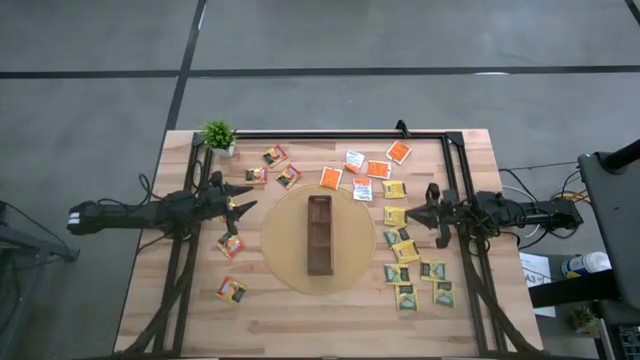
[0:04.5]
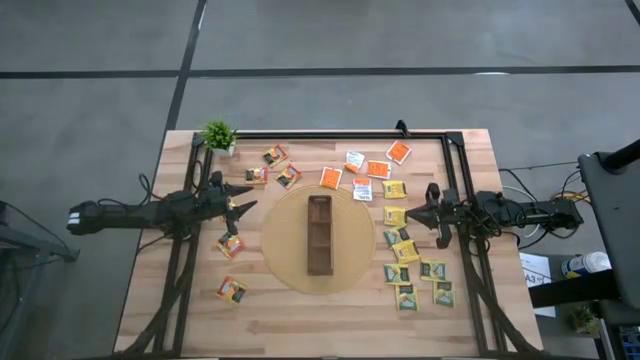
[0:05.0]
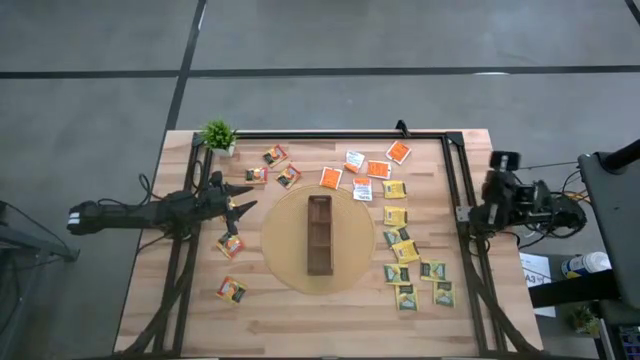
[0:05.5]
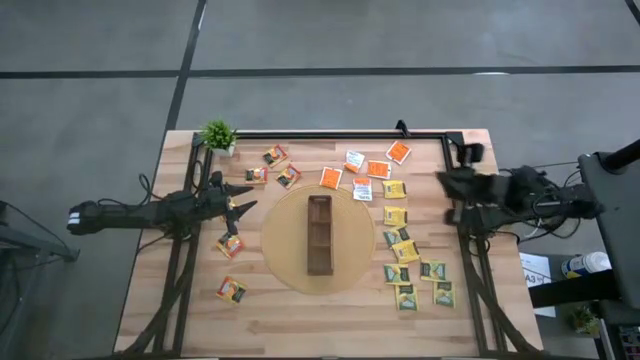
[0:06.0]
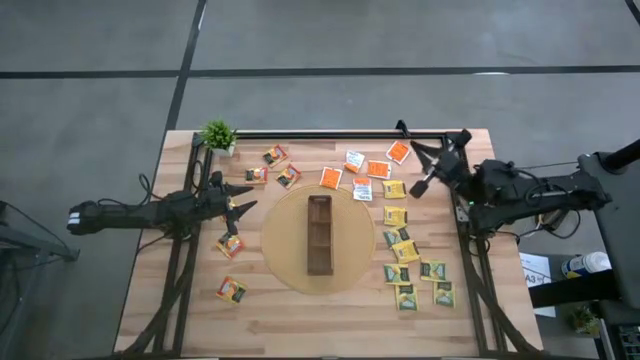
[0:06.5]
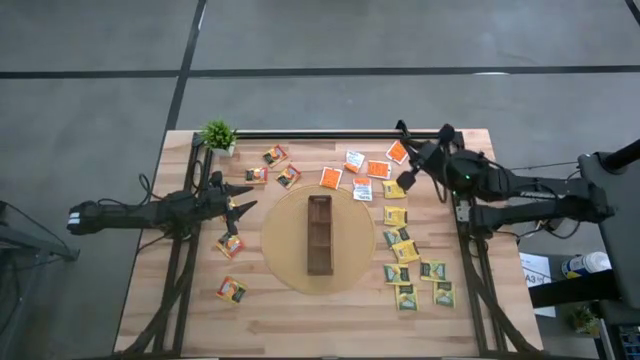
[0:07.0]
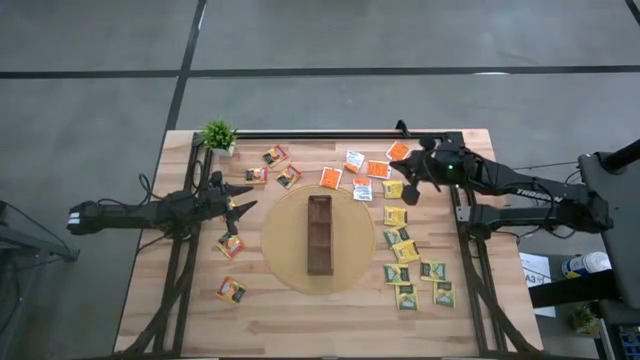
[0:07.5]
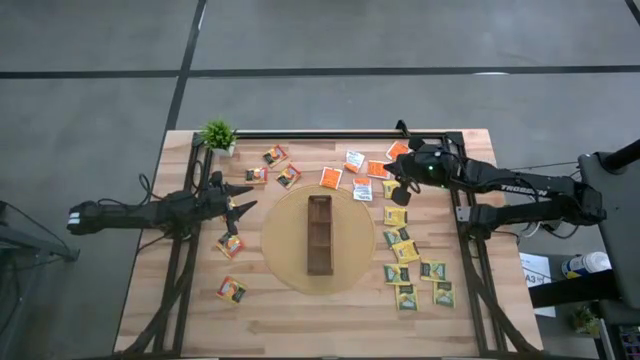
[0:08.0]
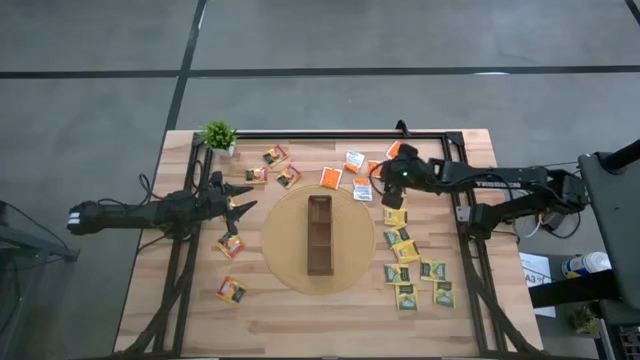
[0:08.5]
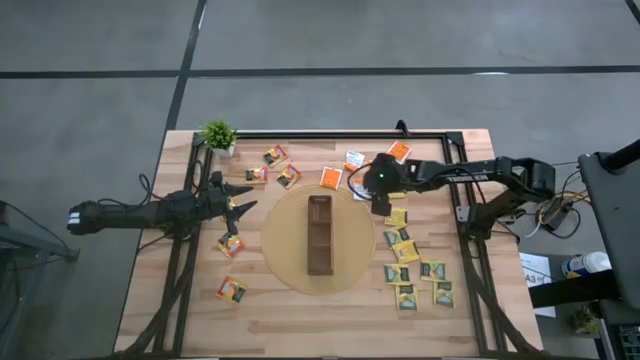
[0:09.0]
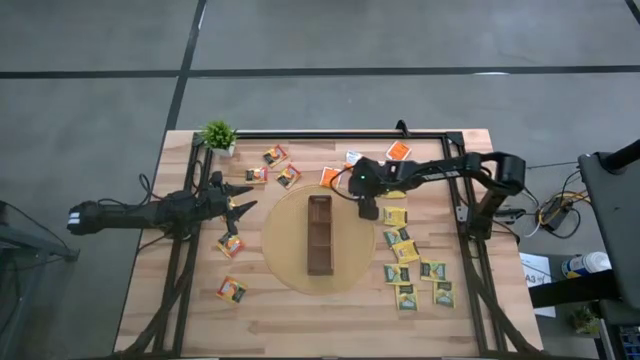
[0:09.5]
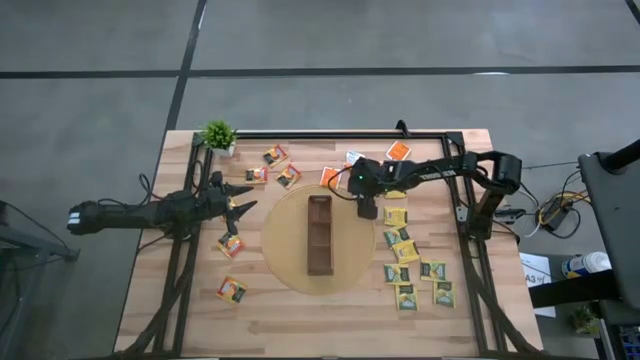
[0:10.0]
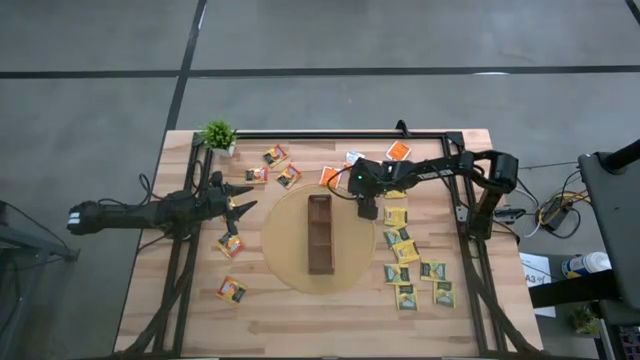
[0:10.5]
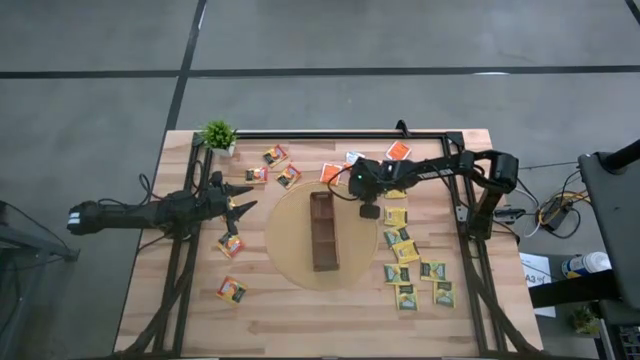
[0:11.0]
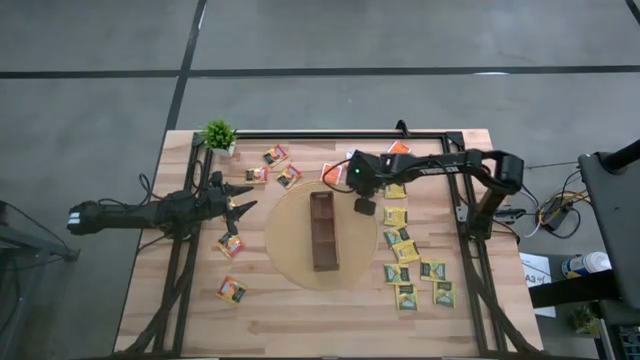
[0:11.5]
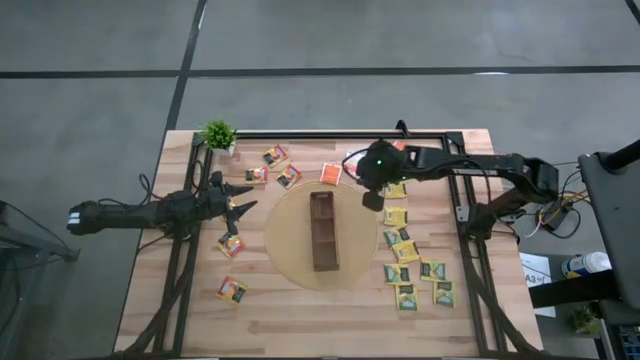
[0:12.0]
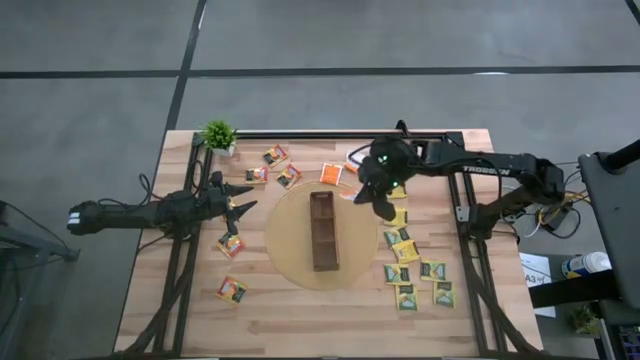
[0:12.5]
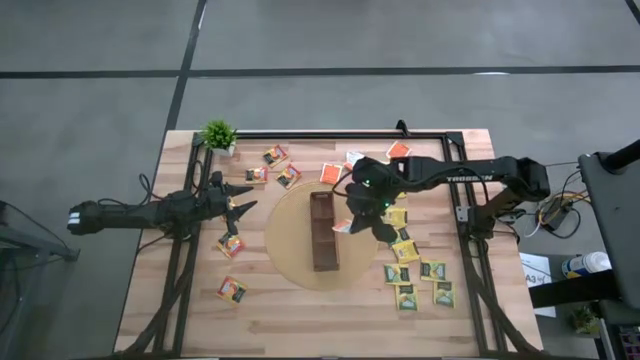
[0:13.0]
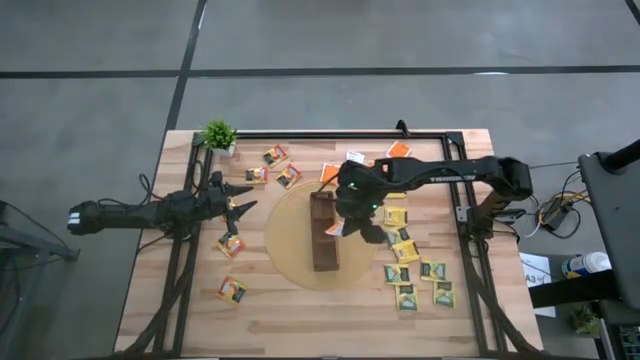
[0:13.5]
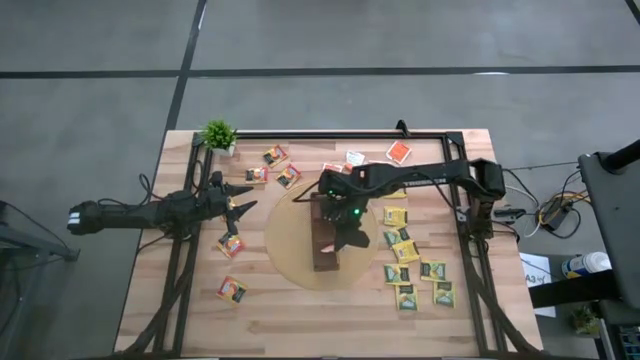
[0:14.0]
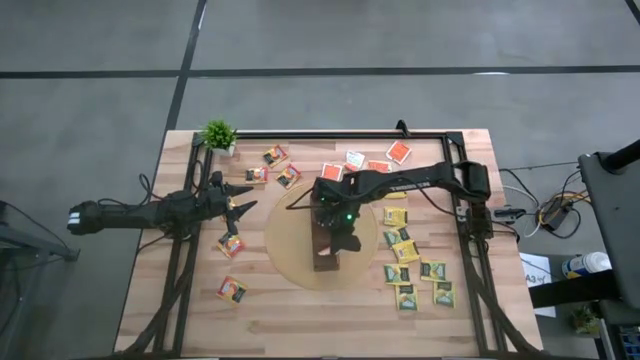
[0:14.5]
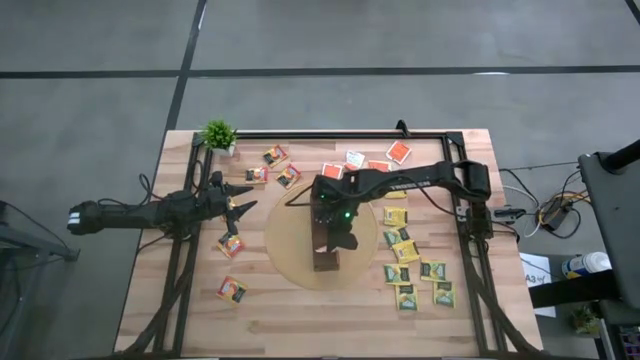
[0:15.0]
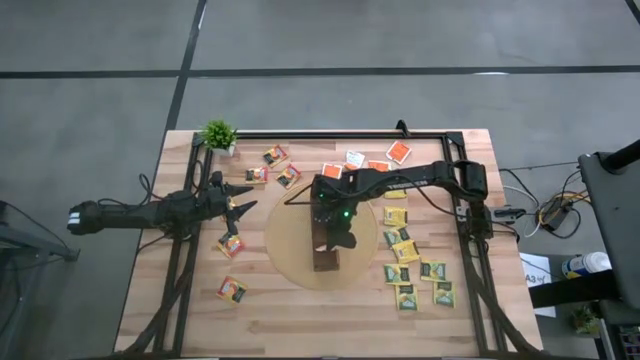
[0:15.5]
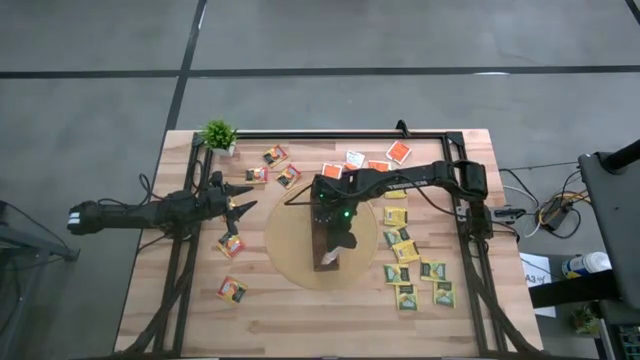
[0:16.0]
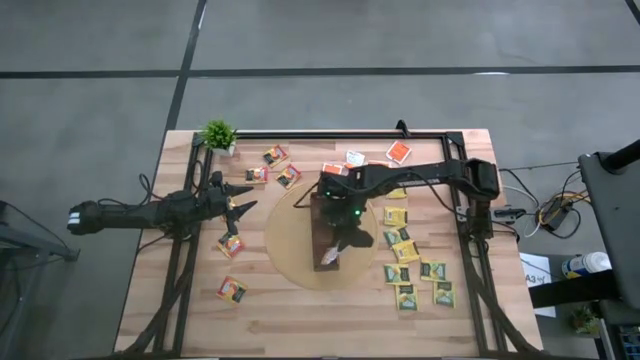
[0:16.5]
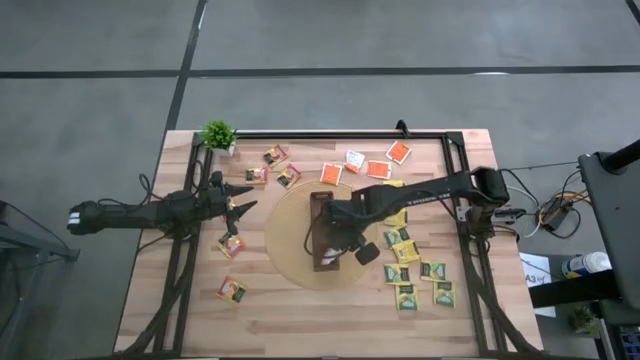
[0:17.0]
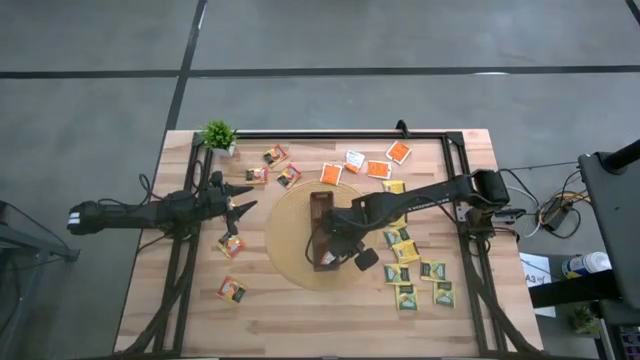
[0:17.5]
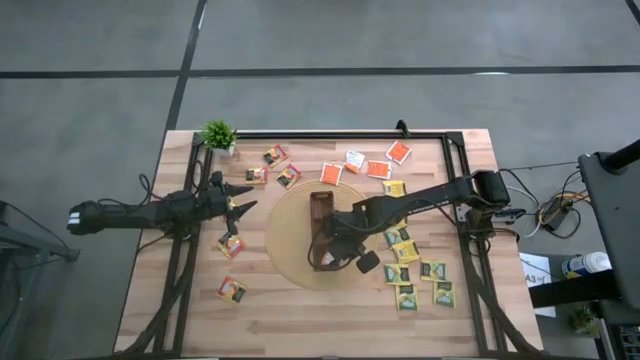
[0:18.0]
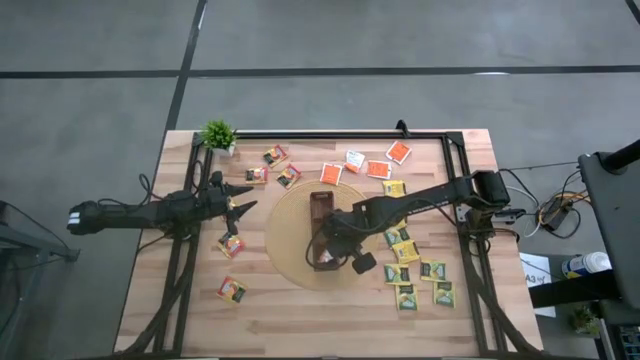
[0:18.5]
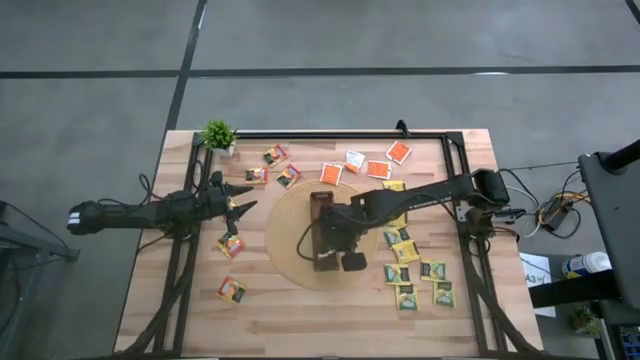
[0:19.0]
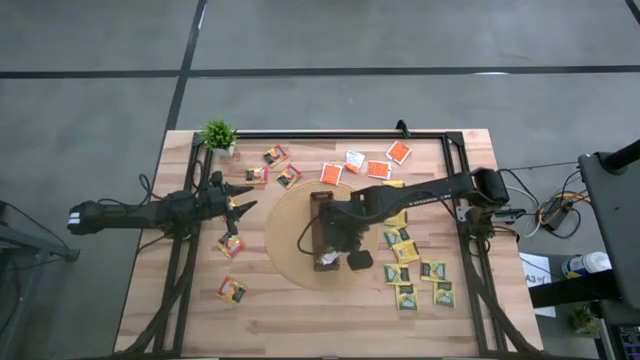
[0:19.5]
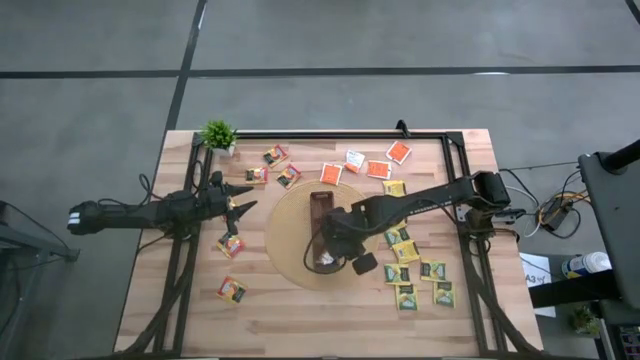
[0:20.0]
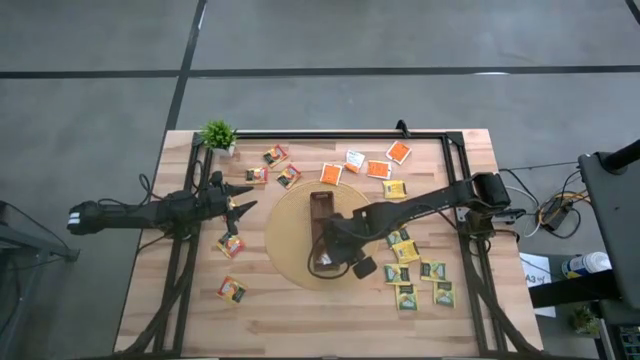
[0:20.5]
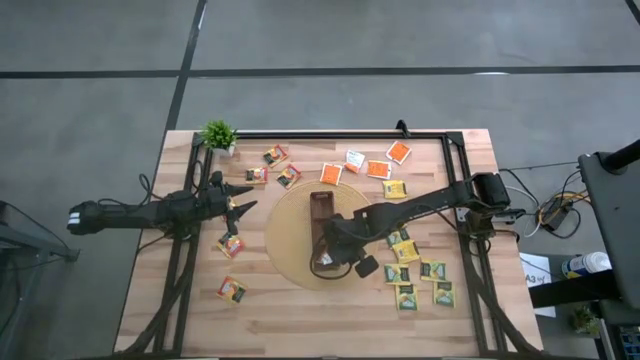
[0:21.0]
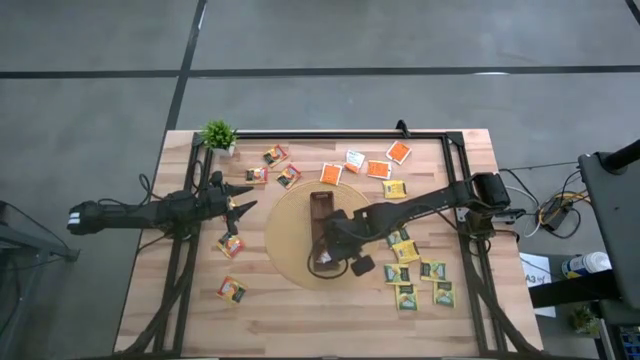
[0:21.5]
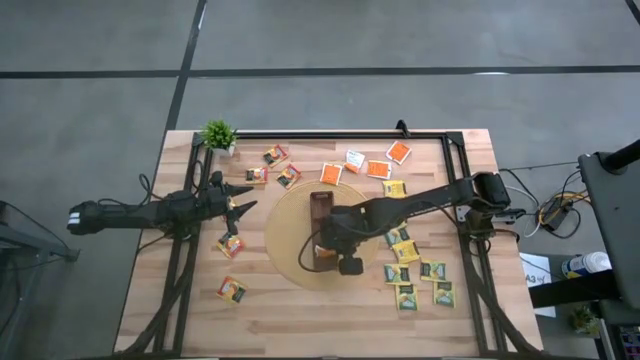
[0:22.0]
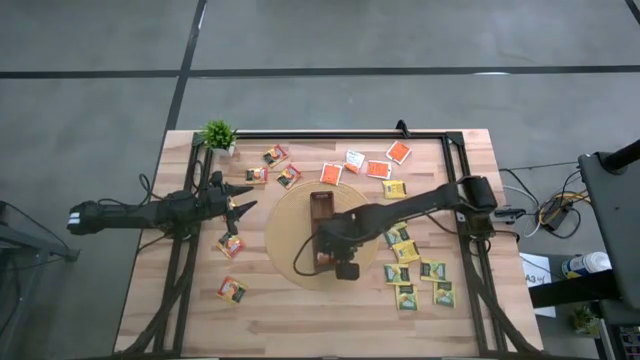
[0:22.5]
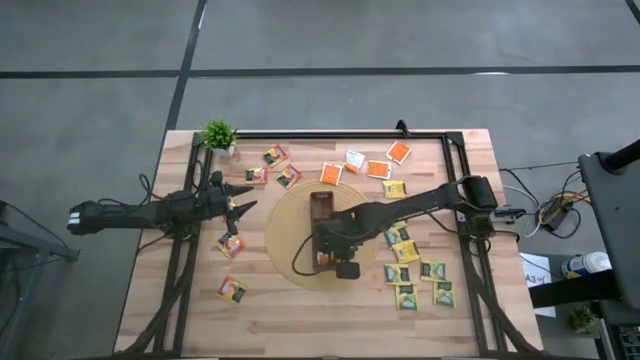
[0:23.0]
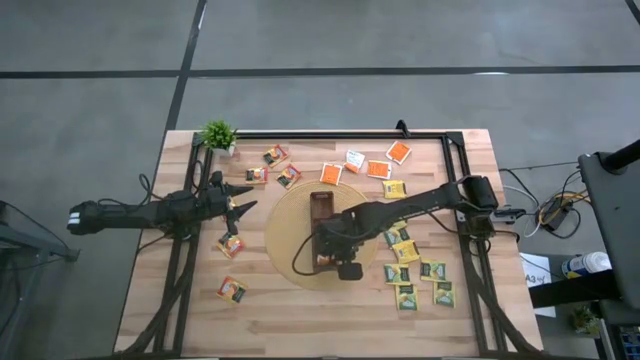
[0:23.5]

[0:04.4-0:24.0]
Task: Pick & Place Tea
Put the white tea bag into the bottom section of the wooden organizer
